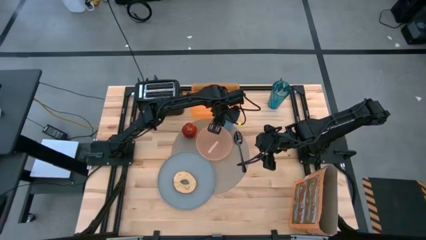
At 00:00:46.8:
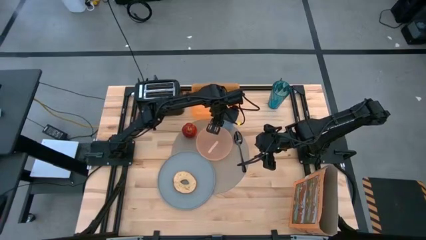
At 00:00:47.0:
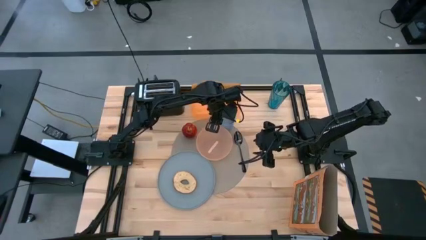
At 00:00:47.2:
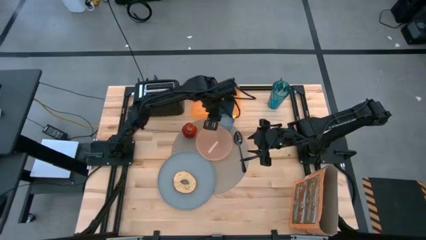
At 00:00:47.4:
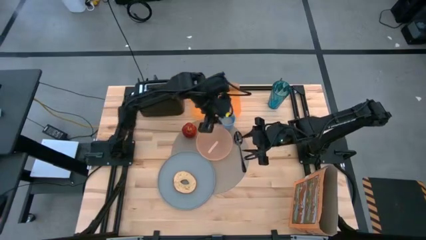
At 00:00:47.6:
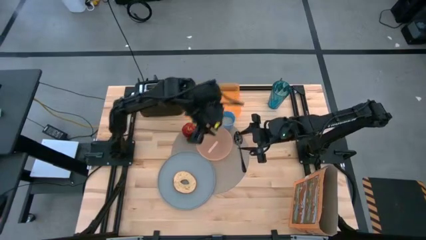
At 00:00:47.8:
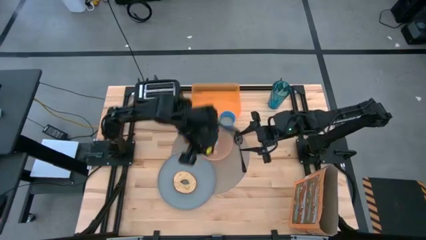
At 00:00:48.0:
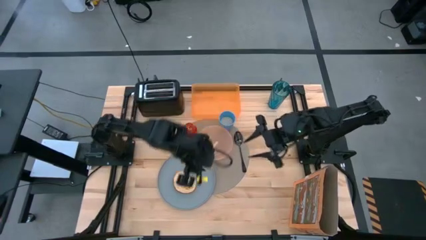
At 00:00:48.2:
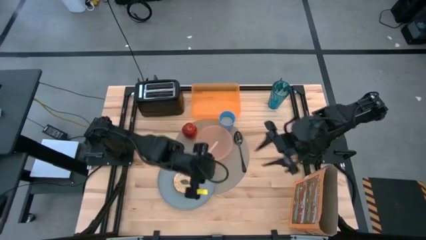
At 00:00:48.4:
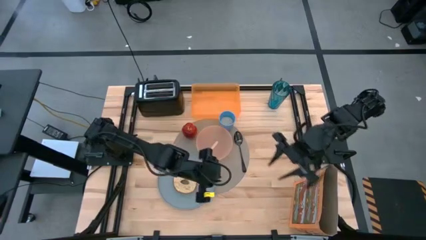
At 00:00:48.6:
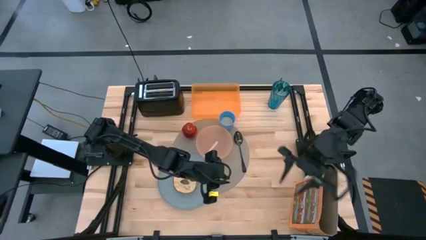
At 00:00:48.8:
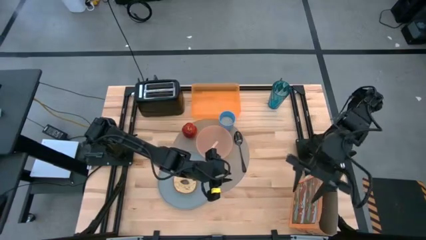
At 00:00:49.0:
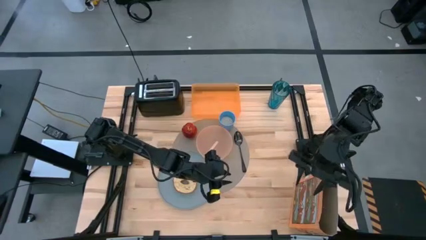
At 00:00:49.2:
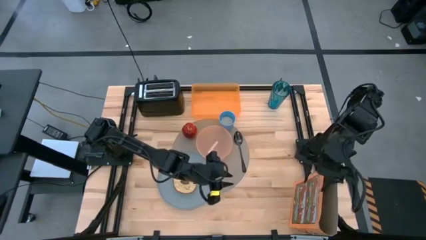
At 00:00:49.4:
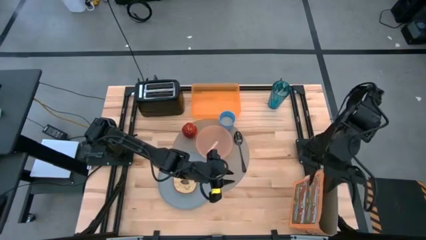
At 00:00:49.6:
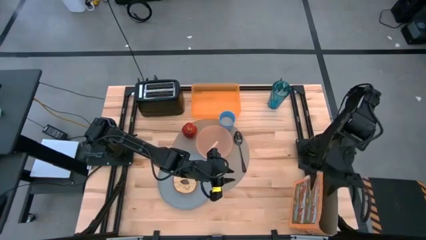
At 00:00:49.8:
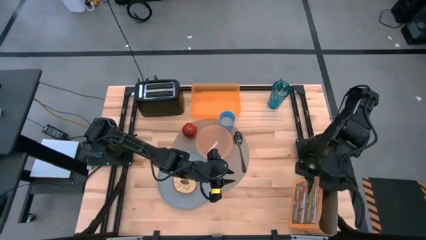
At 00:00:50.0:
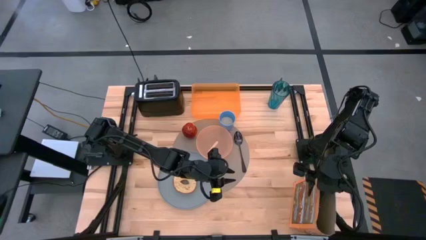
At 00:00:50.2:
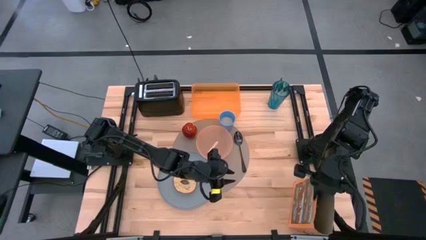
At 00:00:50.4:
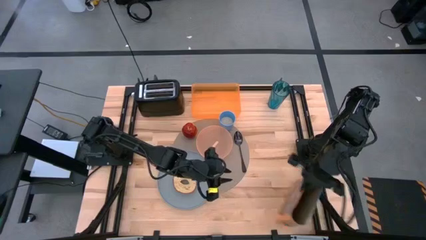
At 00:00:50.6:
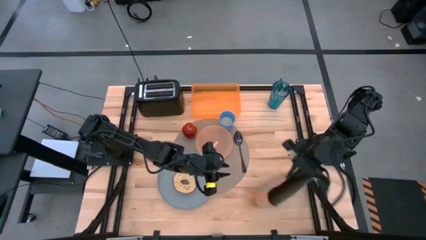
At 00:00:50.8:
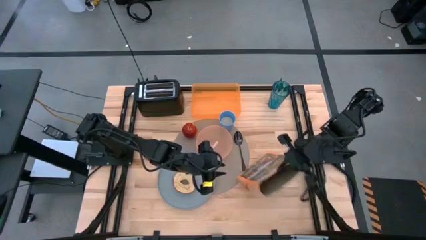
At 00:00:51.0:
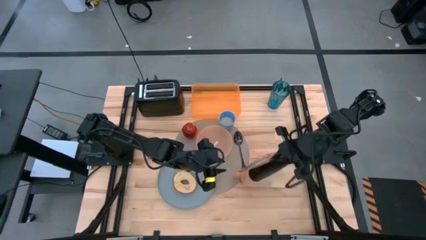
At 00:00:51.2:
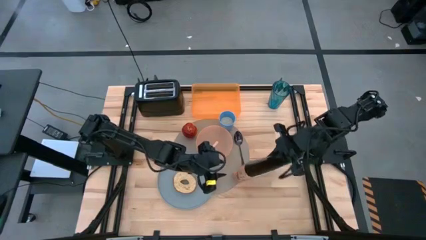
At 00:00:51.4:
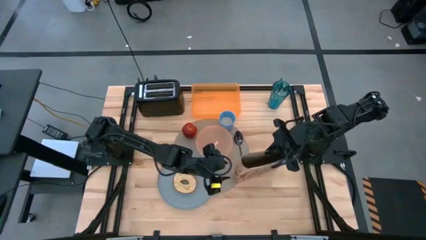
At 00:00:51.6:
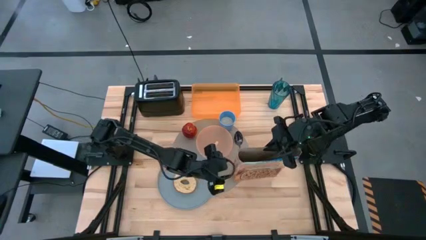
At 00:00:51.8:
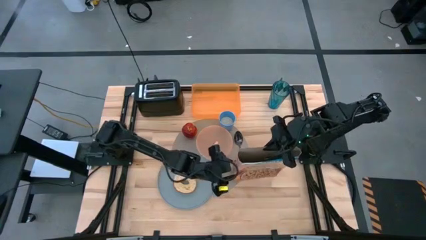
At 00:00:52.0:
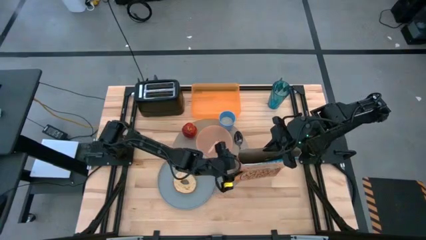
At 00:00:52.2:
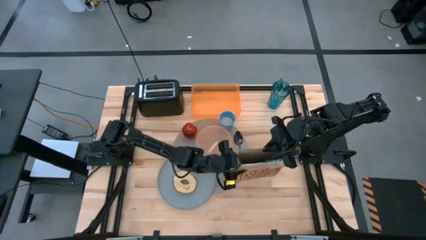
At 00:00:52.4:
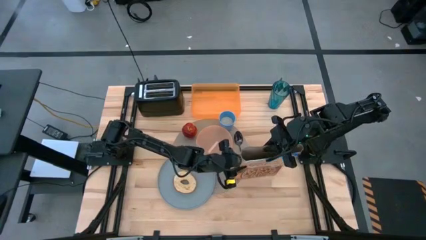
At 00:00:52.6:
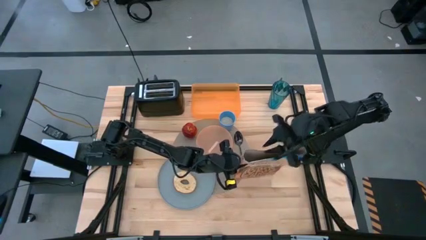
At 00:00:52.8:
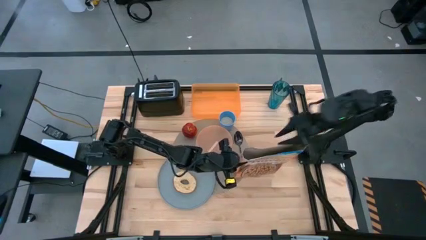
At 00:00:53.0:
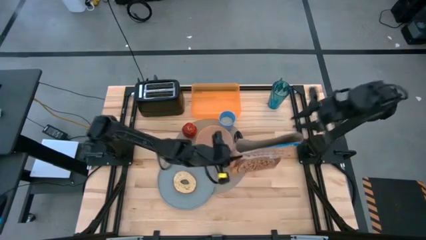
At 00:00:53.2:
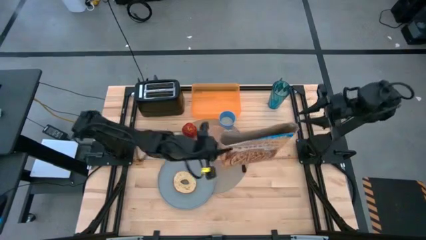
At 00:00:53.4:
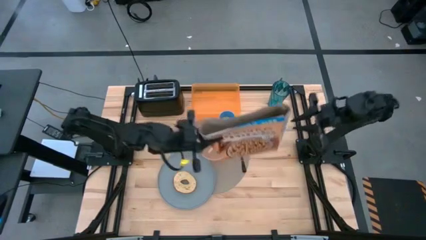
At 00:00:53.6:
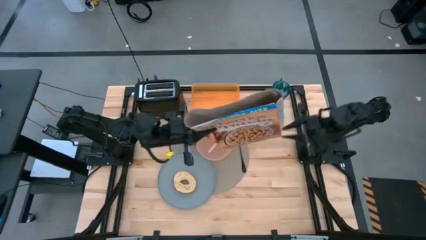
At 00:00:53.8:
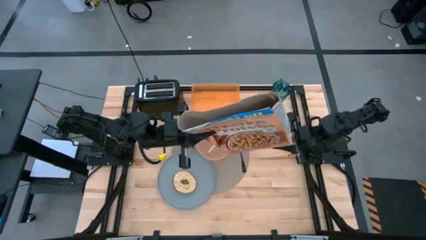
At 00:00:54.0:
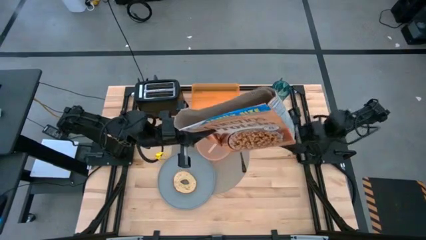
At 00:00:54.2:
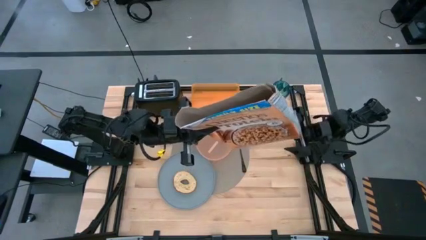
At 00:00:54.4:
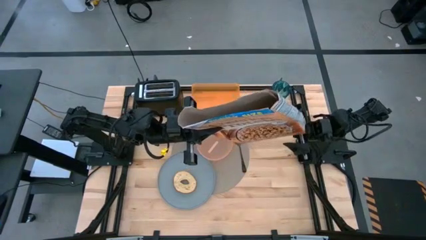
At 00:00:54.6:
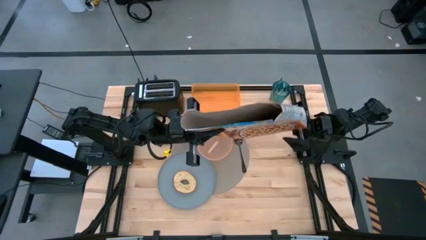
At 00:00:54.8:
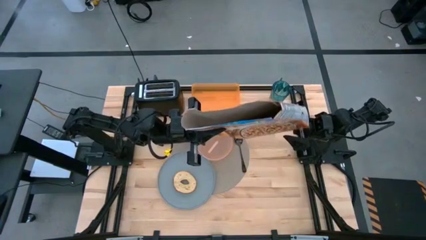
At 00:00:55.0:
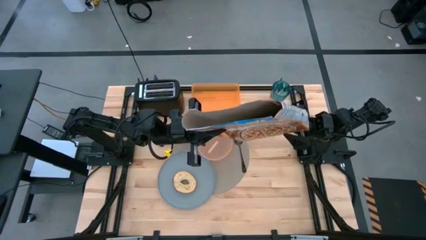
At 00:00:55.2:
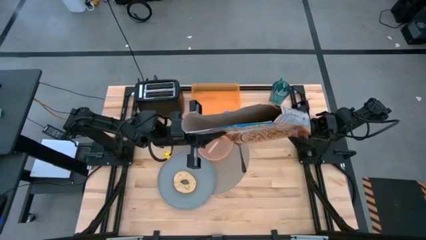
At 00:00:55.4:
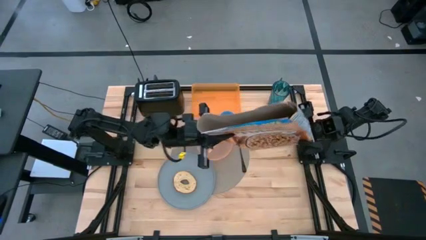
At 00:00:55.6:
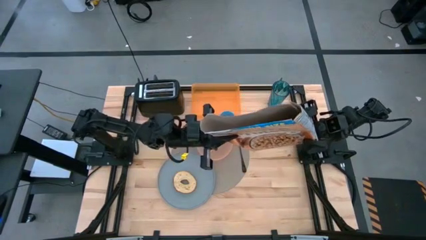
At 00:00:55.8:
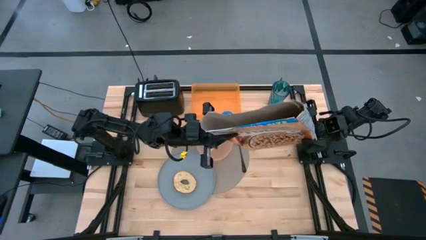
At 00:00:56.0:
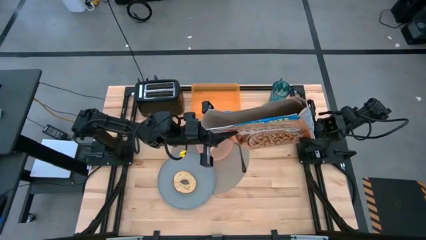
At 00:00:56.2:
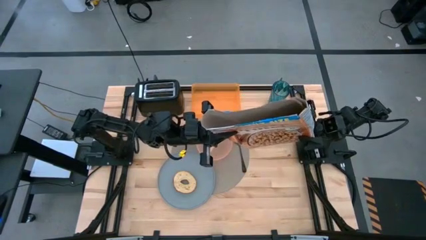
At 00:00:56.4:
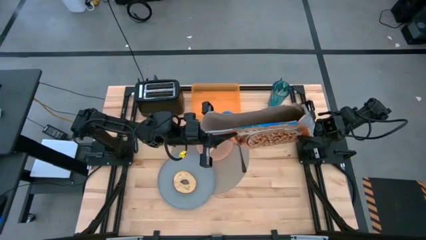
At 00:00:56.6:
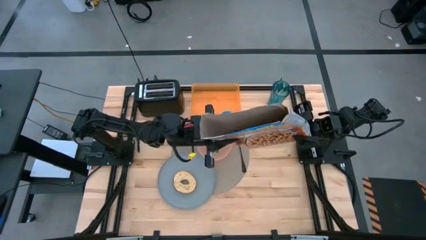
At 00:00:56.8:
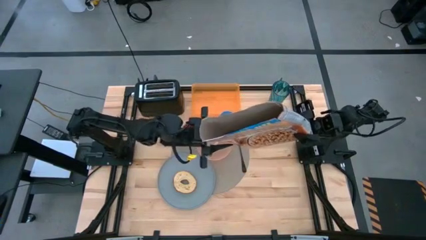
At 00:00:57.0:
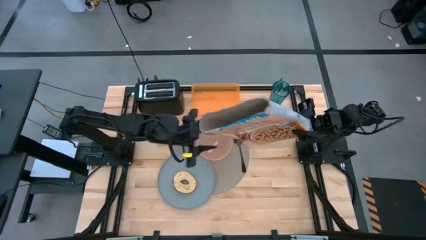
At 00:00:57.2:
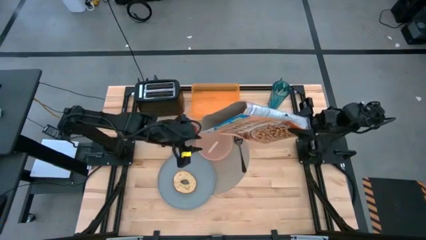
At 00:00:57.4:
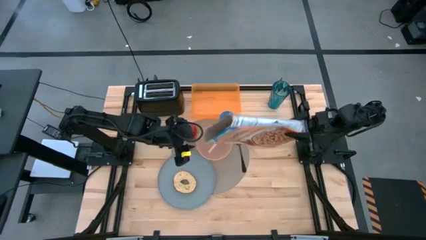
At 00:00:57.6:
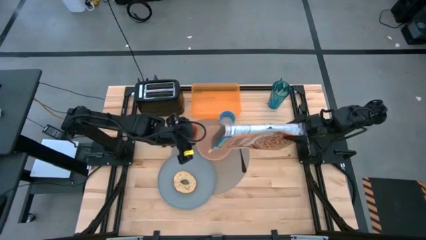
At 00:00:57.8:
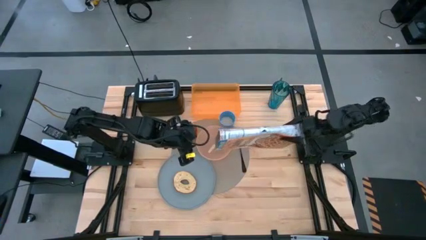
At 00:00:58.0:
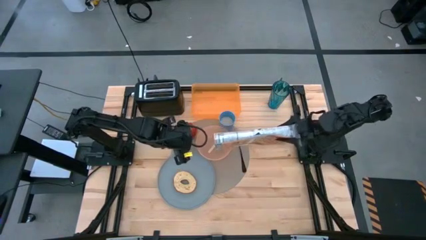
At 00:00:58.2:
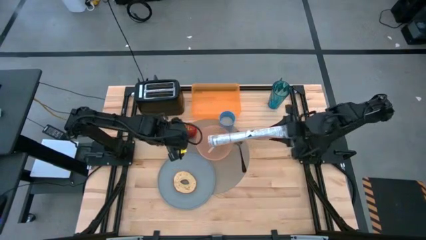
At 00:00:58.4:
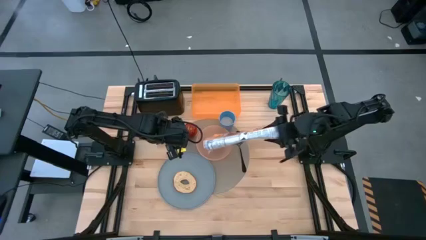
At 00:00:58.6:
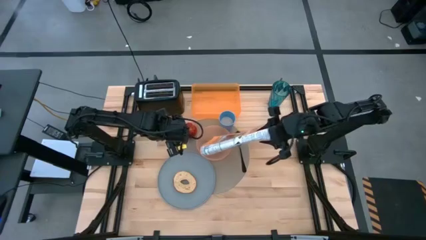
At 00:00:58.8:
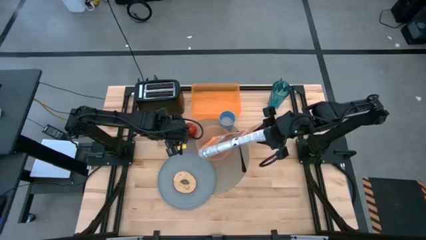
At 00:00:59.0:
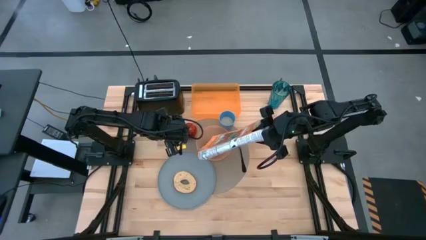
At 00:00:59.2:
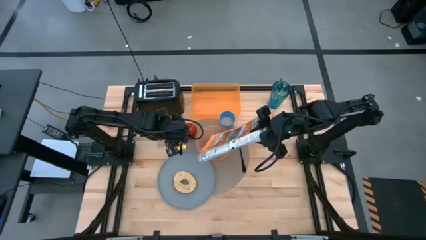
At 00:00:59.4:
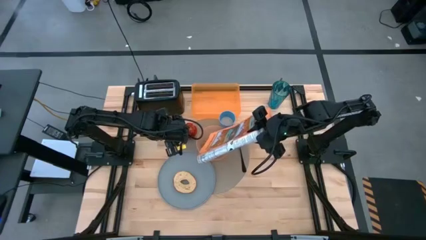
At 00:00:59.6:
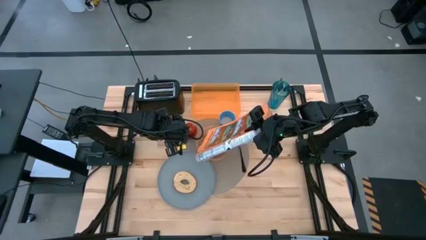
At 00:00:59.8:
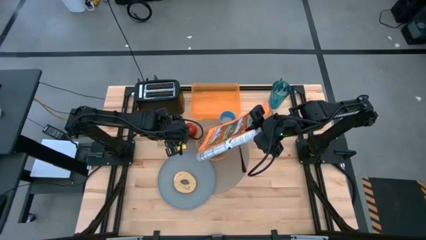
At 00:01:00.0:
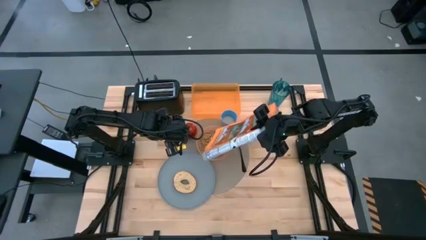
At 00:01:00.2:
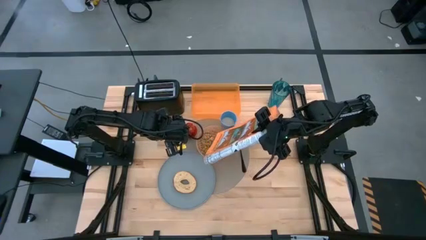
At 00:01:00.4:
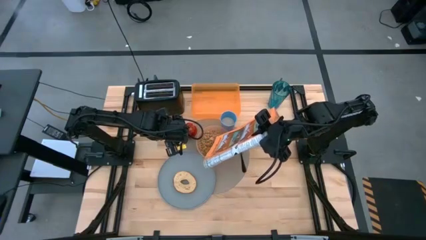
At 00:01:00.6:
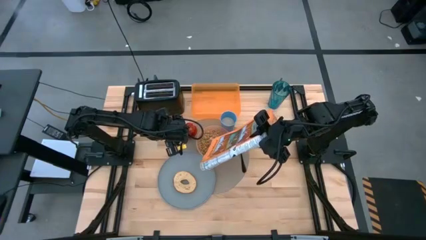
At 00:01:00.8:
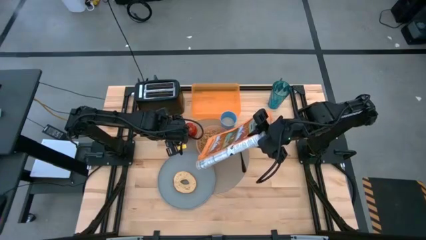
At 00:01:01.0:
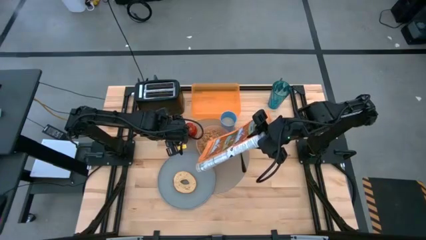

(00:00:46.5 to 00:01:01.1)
Task: Arrange a breakfast setting
Pour the cereal from the yellow cereal box into the light orange bowl
